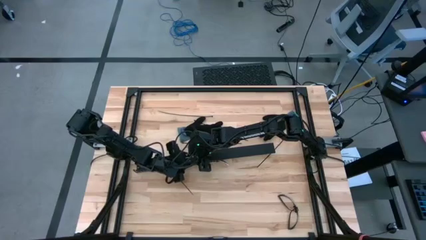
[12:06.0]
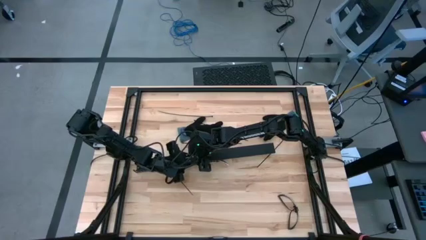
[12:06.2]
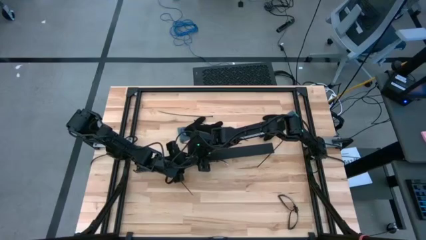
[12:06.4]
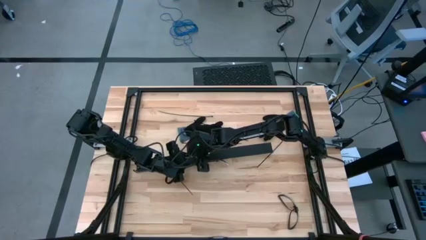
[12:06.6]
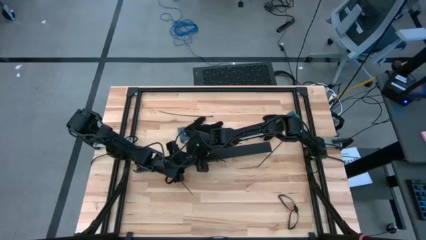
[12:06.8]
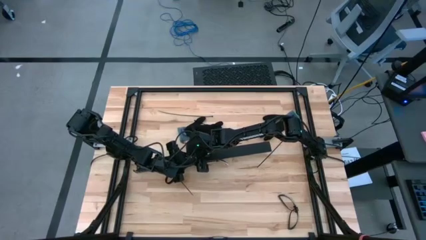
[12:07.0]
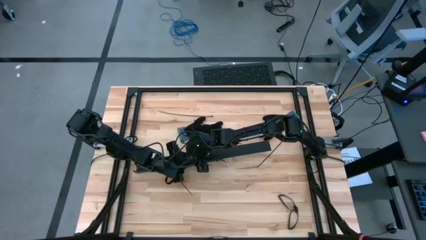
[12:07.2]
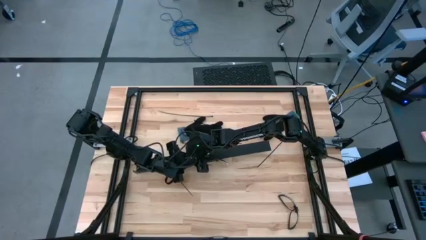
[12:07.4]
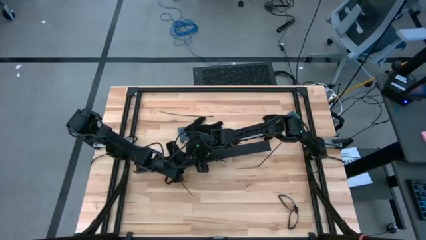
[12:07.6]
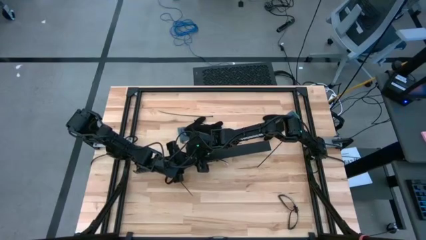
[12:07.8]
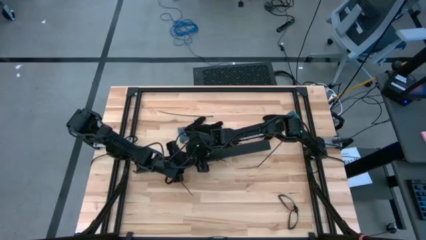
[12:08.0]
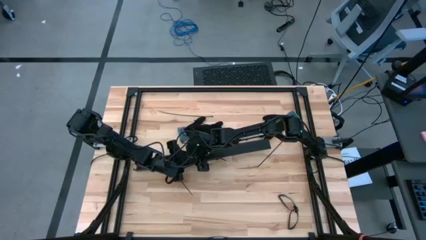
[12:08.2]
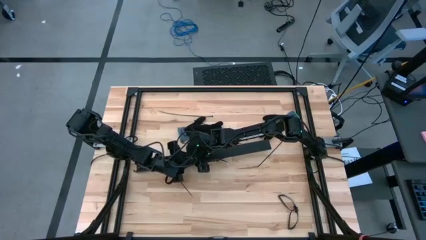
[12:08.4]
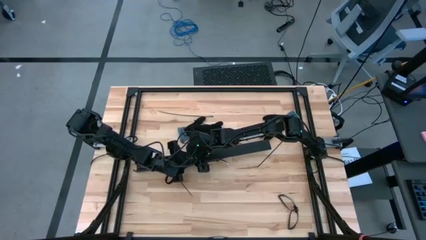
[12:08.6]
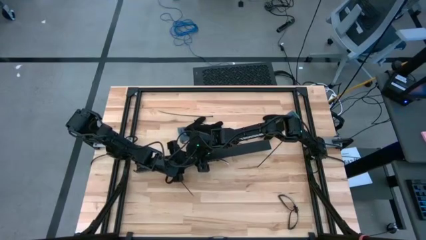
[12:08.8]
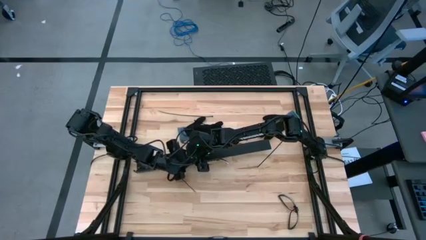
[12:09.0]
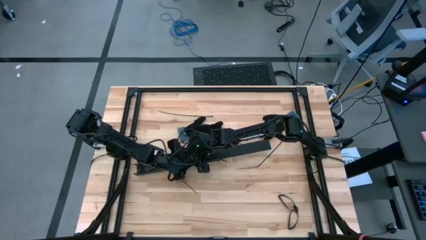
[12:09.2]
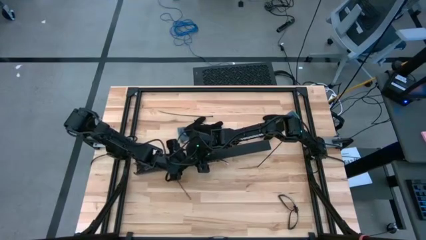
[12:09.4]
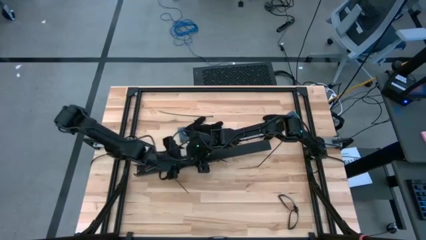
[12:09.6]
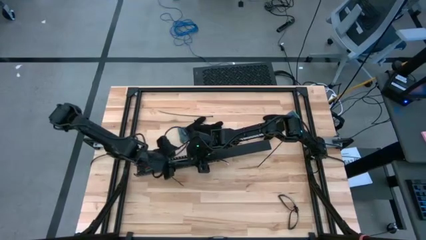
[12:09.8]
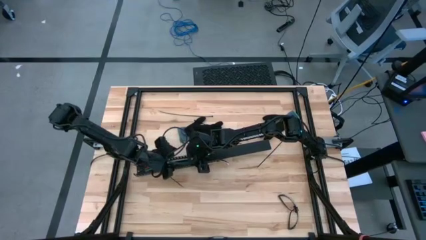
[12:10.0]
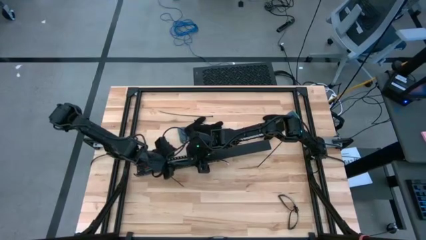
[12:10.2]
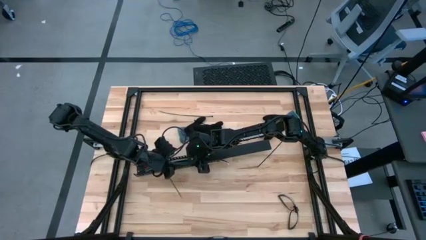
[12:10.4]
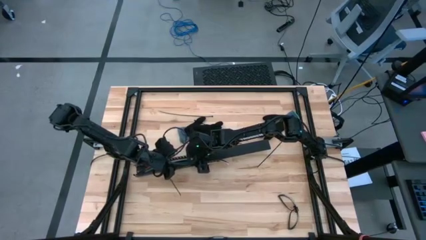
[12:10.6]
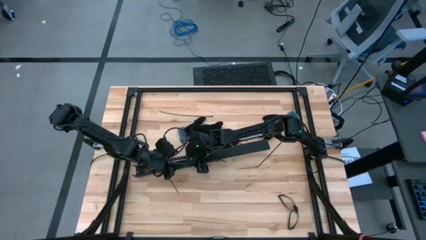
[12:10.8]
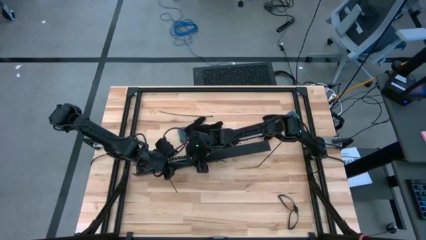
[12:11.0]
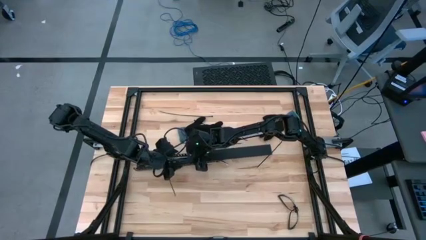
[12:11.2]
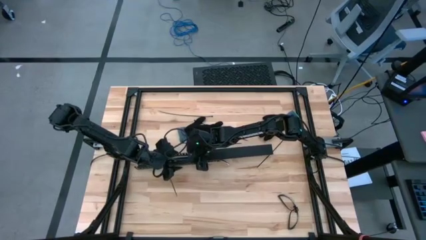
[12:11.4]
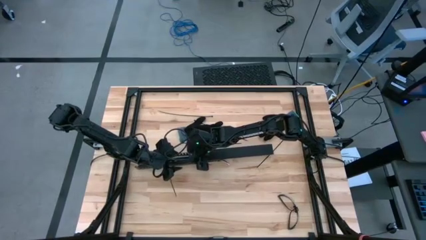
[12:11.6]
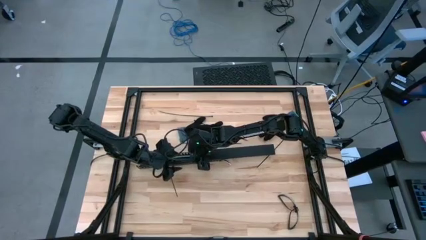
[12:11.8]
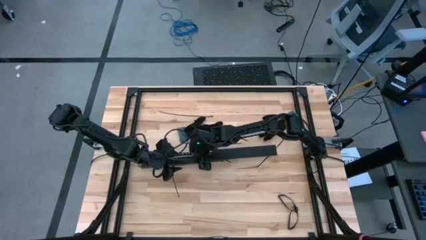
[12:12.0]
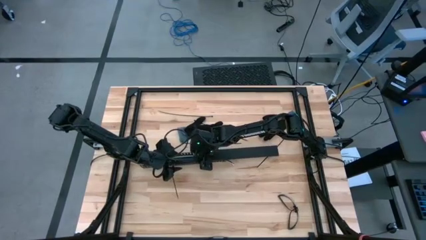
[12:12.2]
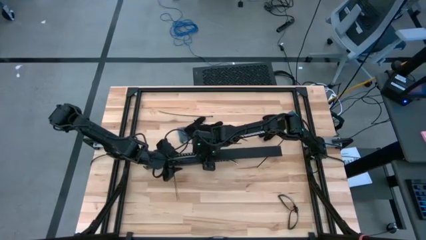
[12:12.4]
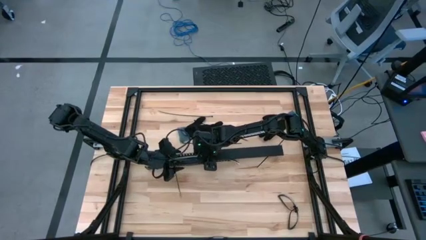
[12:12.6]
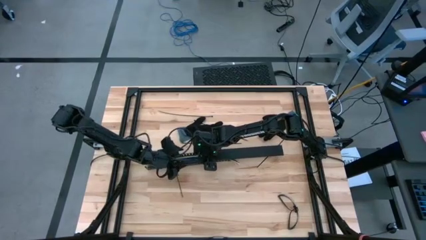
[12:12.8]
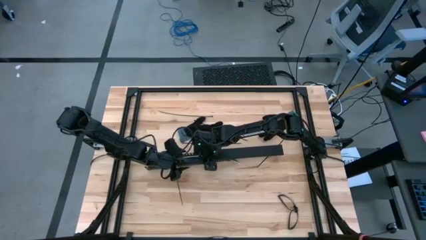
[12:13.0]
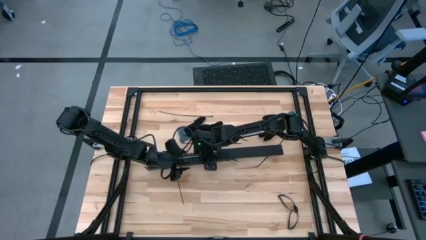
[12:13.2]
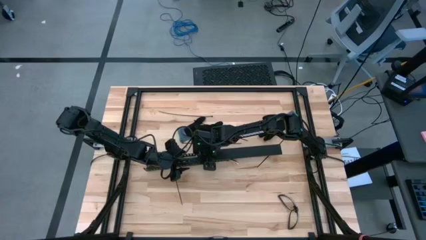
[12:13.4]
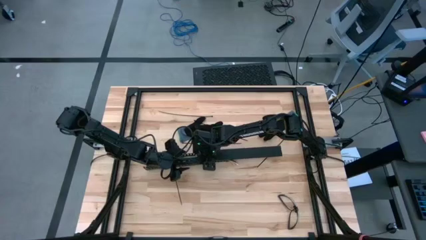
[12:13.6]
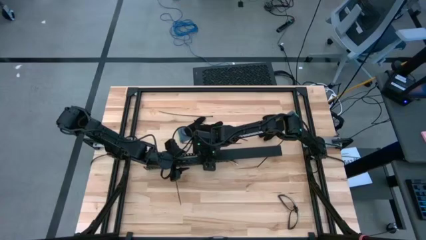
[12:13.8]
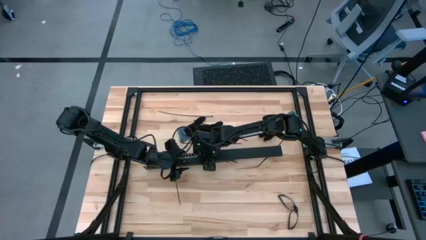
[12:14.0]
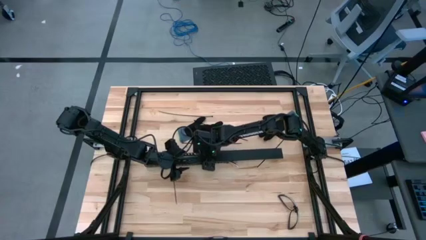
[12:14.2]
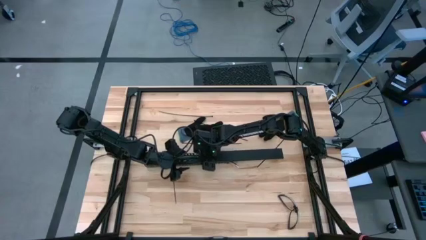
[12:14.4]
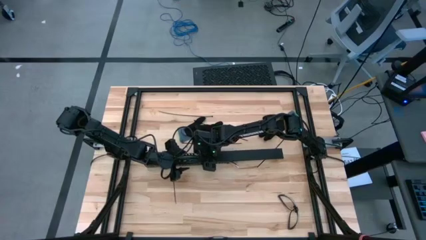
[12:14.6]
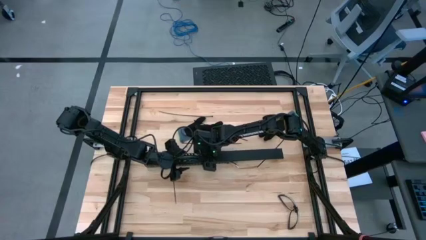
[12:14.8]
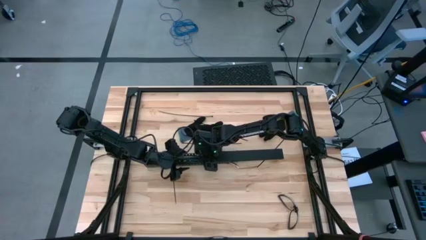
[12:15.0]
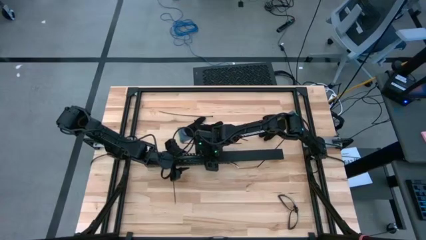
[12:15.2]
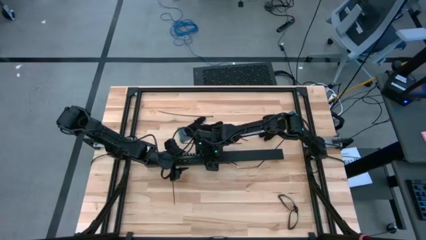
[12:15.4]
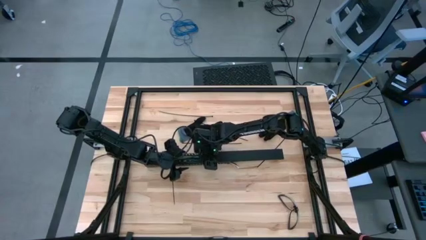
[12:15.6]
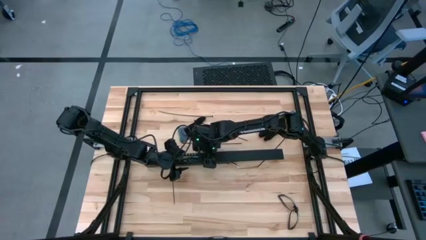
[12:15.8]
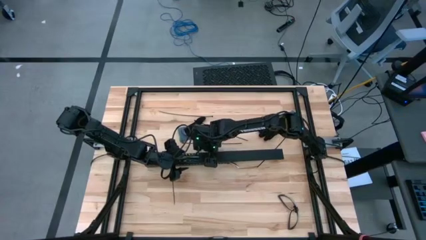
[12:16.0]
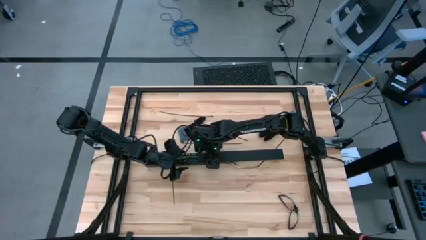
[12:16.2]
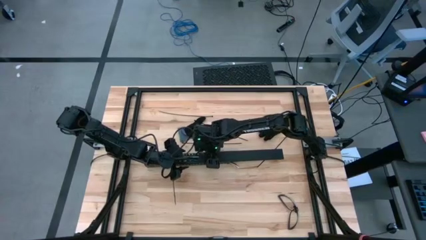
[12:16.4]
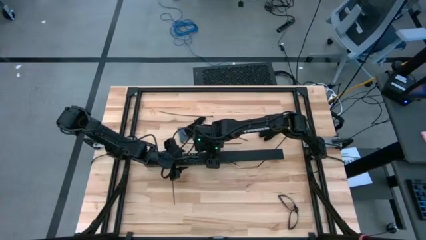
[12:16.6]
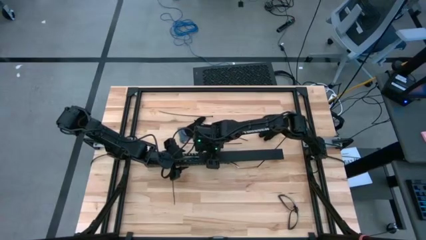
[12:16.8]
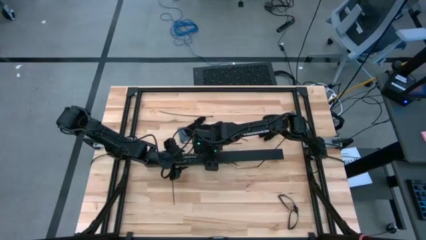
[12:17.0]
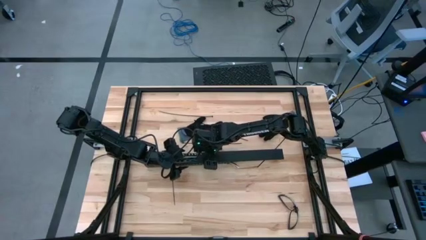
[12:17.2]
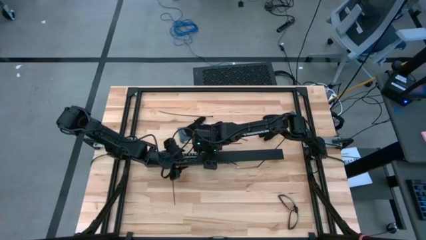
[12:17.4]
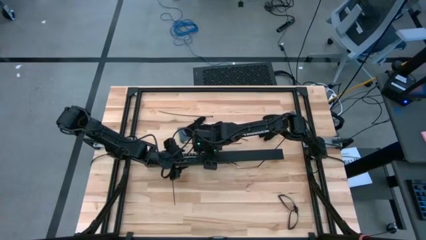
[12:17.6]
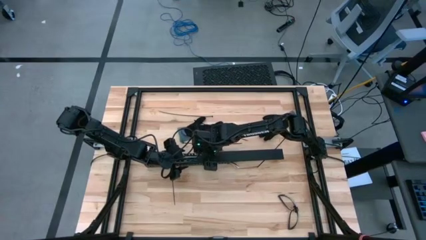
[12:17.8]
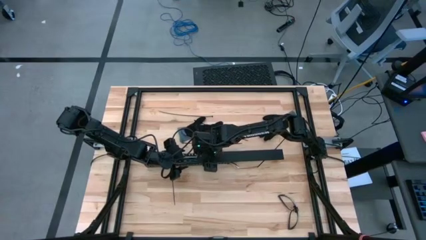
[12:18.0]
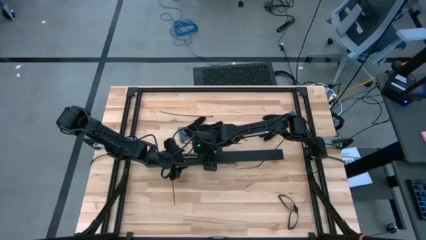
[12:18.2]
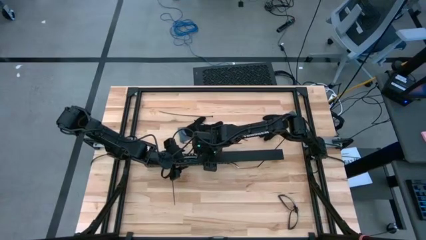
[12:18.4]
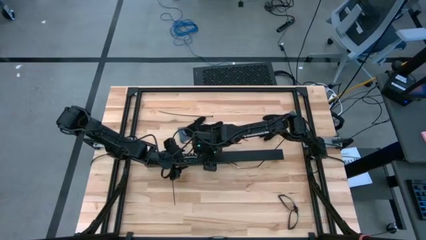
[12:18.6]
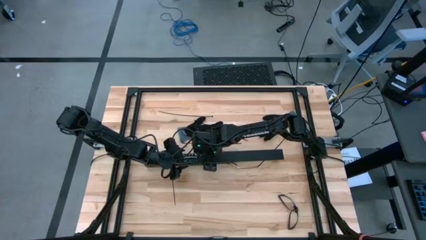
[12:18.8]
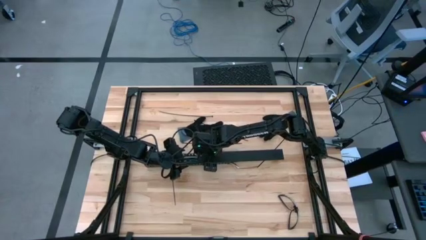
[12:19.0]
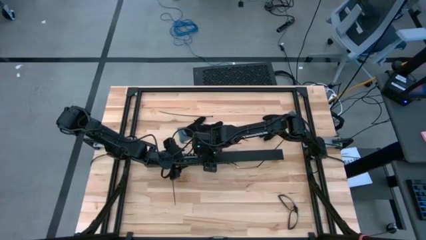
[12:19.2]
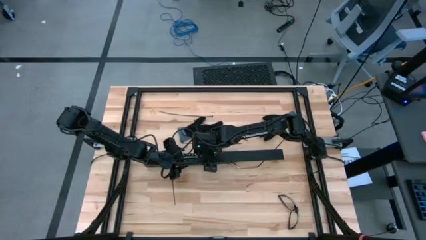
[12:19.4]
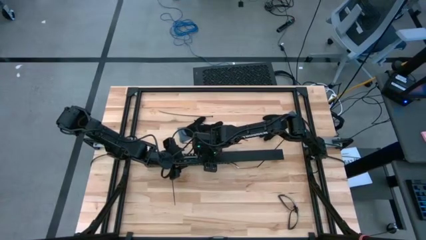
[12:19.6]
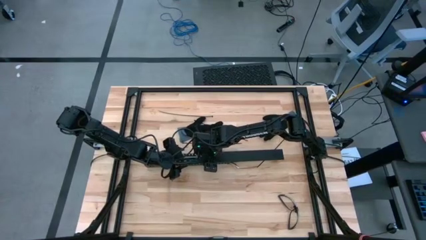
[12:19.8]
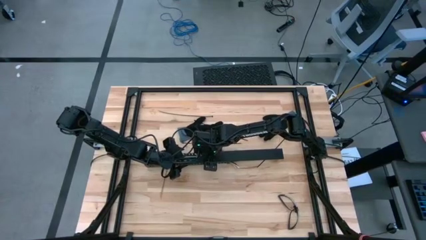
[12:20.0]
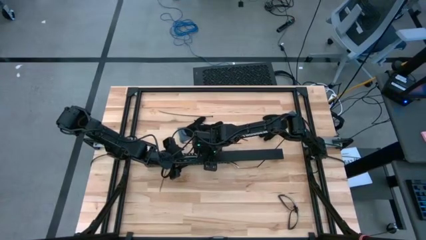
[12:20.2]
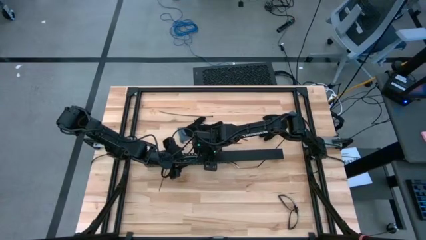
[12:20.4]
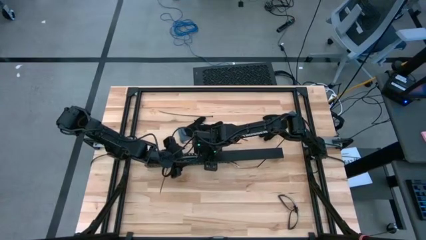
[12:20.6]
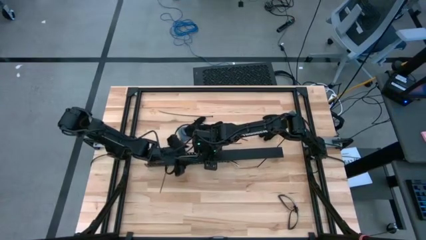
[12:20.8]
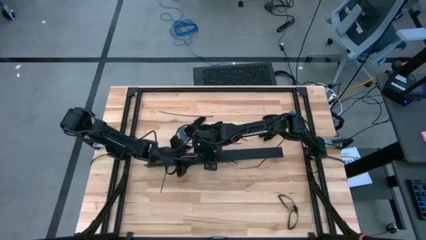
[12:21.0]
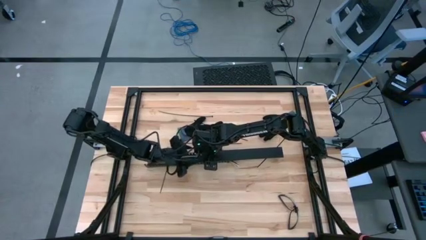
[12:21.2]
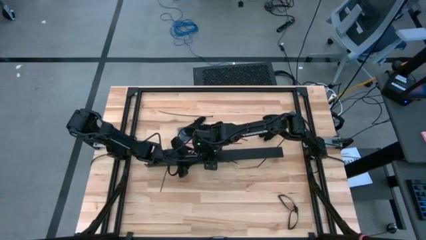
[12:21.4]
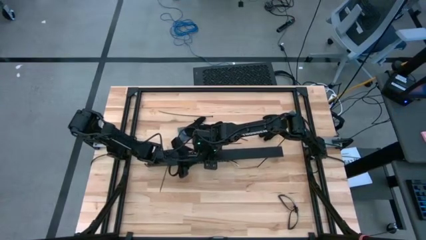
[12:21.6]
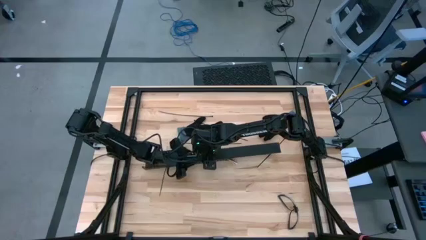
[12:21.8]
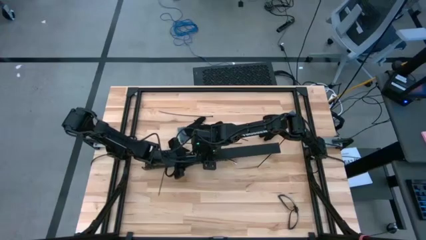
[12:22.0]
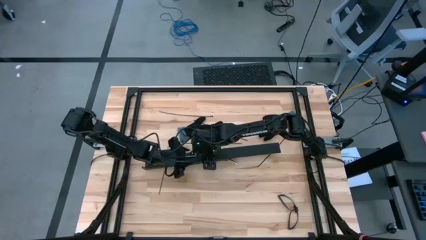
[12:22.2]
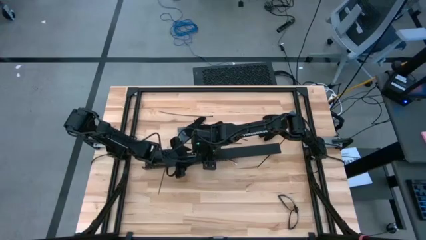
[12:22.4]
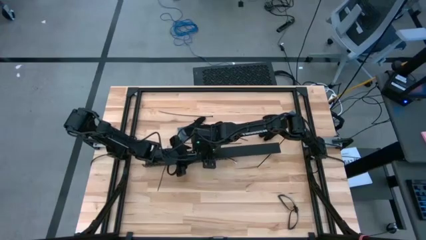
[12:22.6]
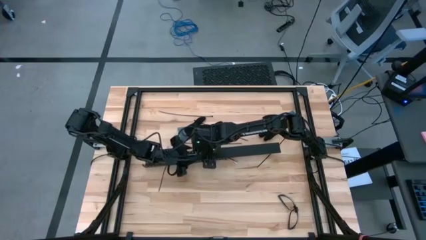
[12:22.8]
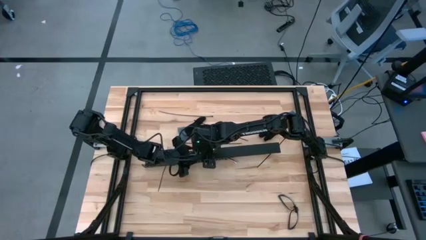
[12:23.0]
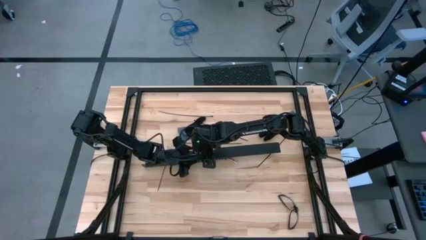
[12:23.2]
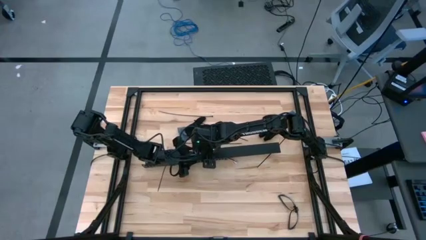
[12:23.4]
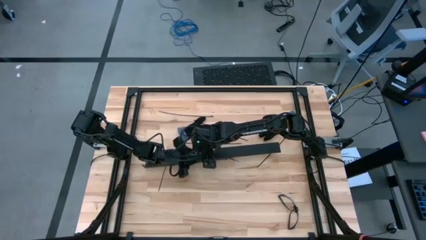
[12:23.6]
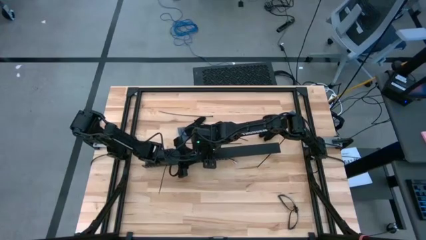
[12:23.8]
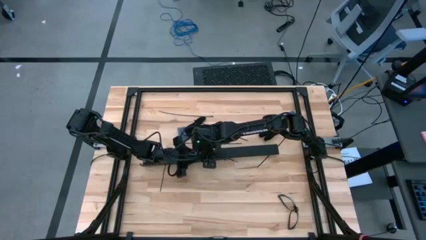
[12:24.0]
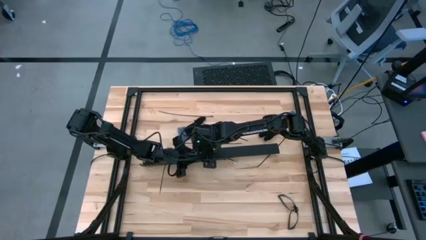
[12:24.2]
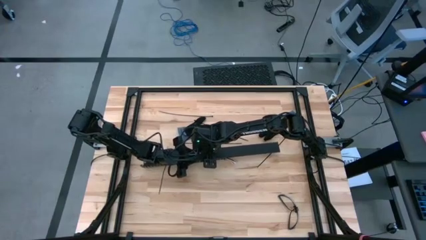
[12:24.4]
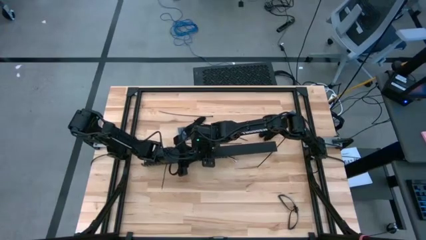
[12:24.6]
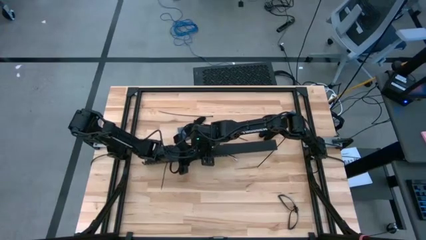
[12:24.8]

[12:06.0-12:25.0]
Task: Ziptie cables
Close the cable duct
